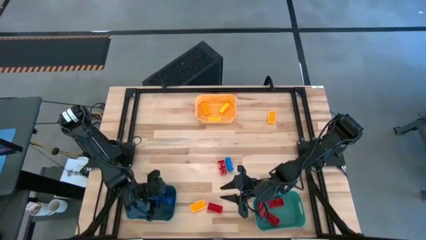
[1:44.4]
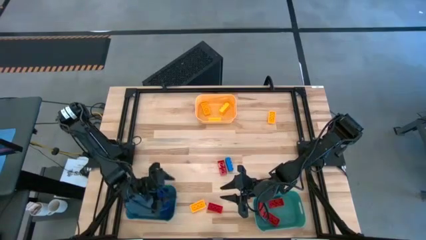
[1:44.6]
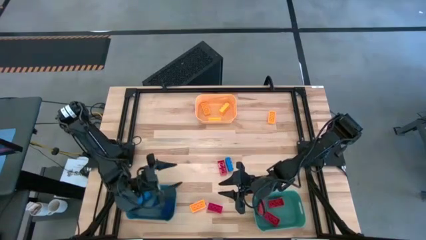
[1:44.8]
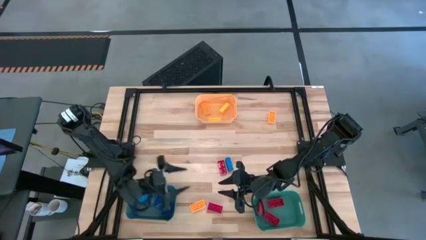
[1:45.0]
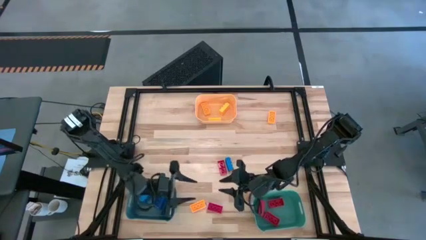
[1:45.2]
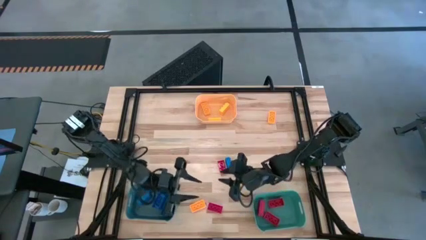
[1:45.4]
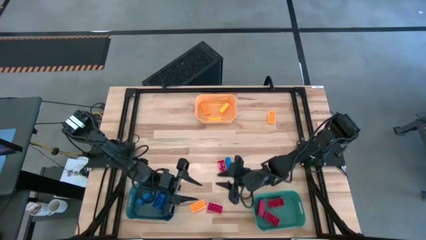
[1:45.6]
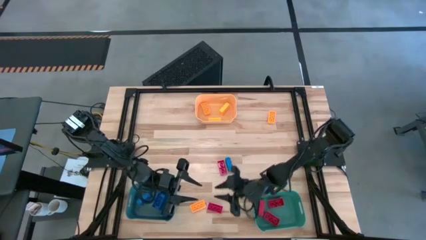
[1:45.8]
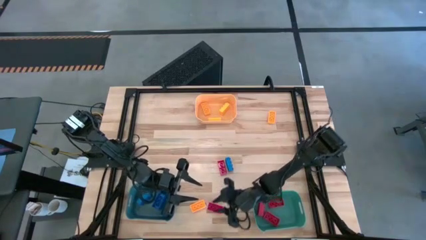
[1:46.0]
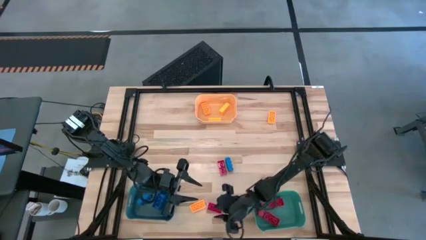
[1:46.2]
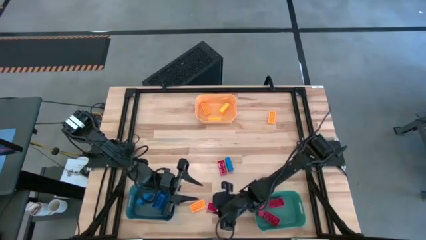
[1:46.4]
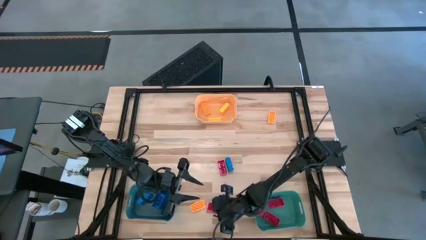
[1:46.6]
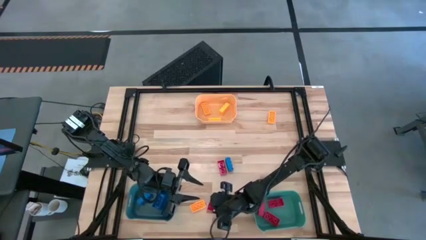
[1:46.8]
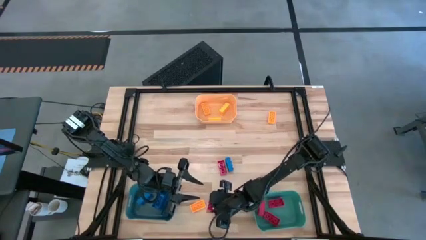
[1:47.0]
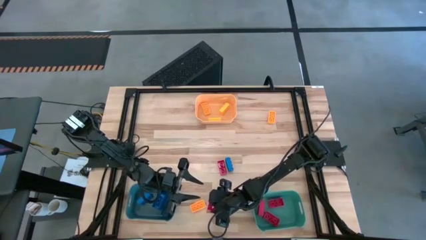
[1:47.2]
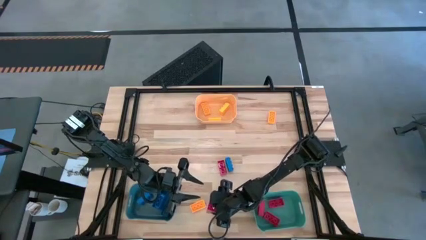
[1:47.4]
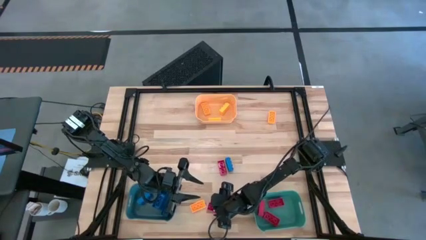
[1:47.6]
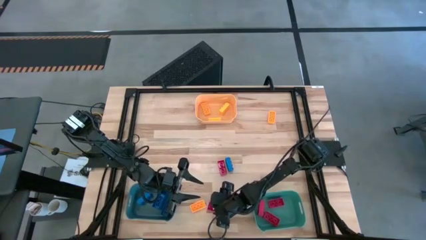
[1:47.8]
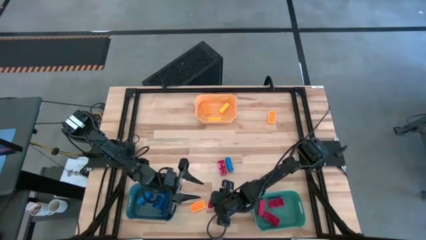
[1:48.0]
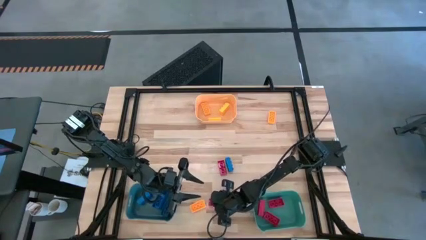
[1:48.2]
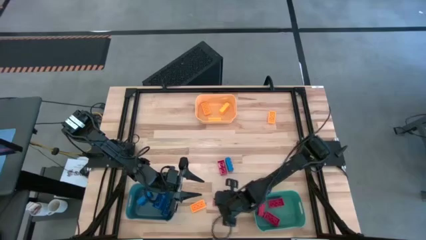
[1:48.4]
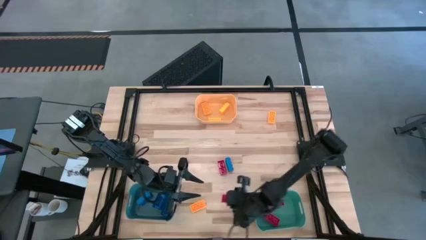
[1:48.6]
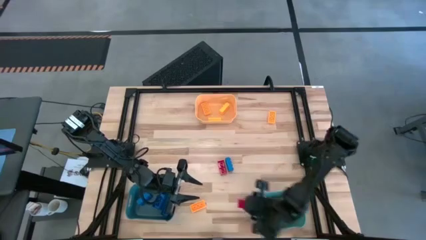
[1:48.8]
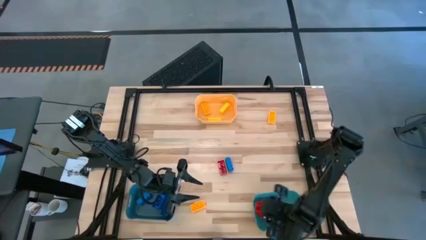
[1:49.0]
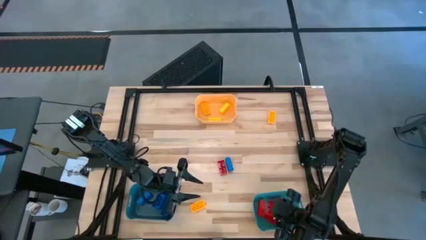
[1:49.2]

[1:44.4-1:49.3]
Task: Sort & place blocks by color
Put the red game piece into the green bin

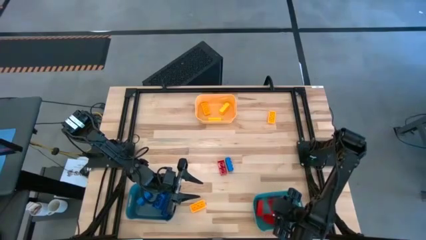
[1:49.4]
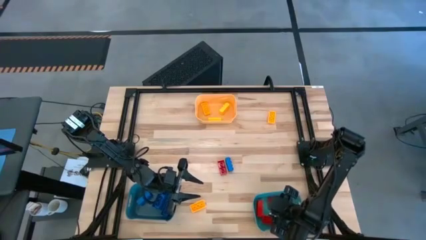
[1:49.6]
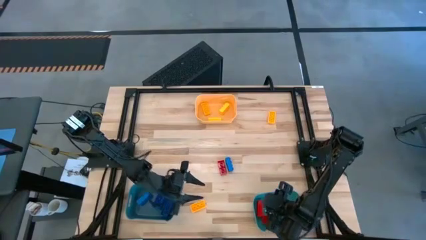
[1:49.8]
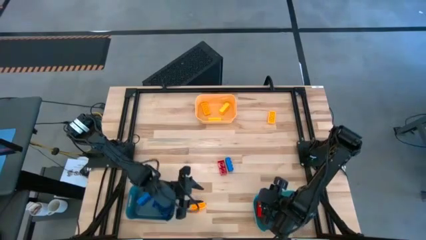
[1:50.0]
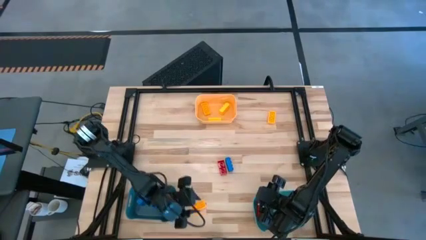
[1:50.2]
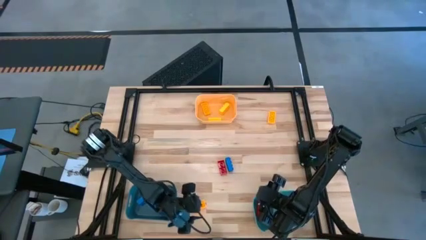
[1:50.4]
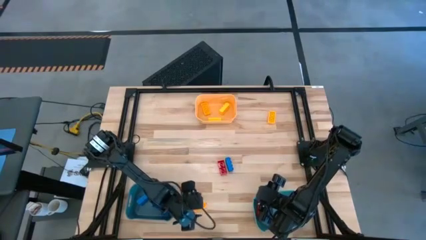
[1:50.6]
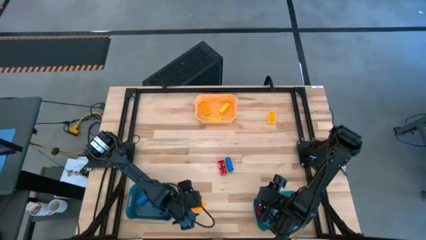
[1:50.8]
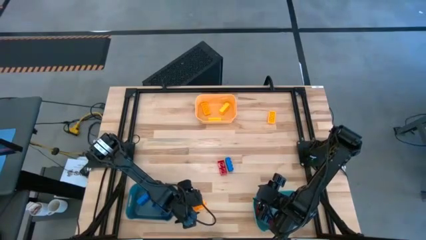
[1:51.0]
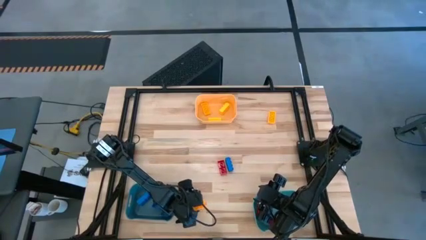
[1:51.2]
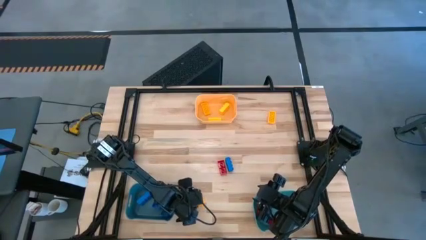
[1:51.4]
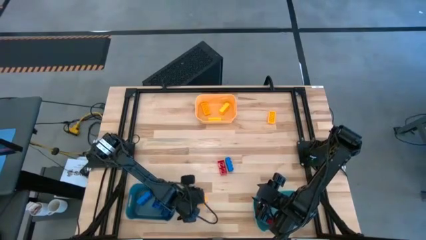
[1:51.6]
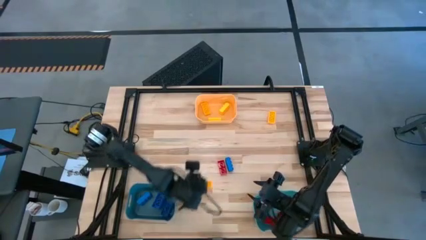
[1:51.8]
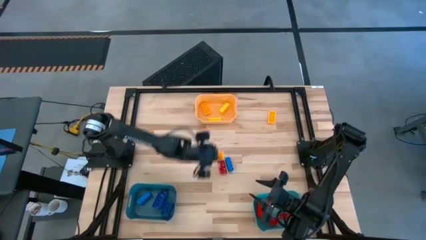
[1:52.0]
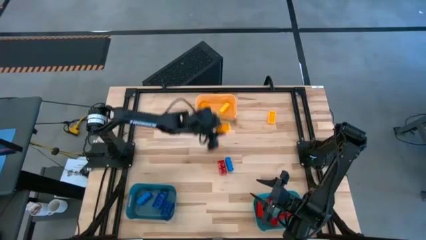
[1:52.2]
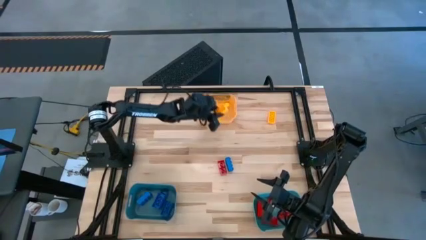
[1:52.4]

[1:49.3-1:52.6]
Put the yellow game piece into the yellow bin

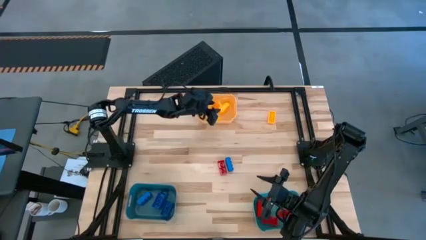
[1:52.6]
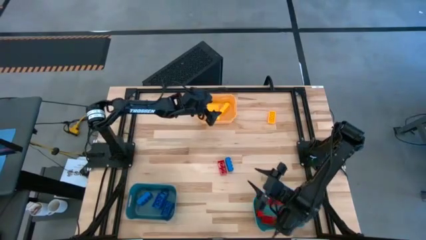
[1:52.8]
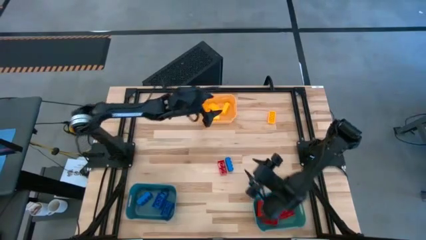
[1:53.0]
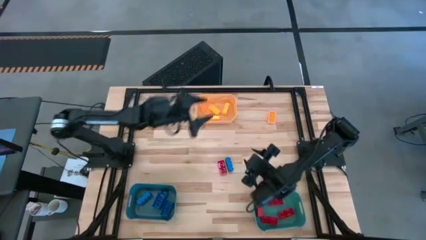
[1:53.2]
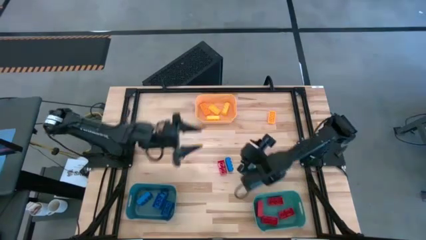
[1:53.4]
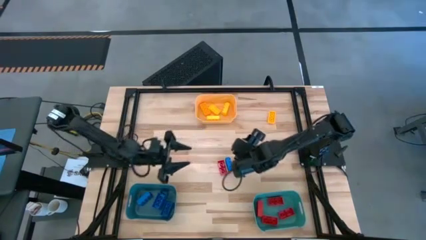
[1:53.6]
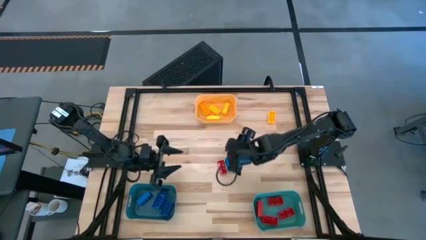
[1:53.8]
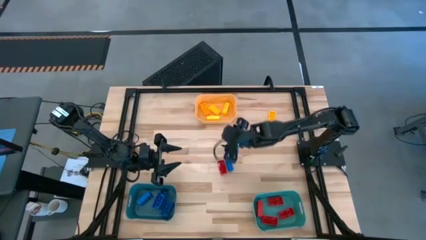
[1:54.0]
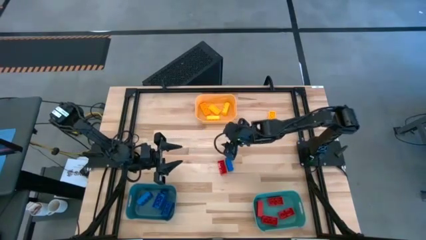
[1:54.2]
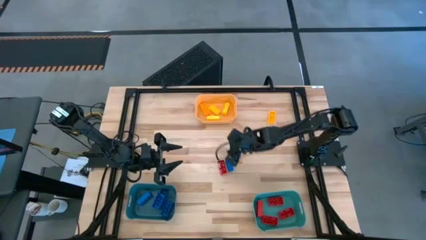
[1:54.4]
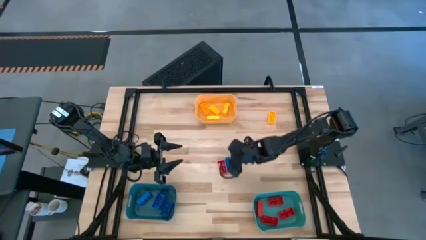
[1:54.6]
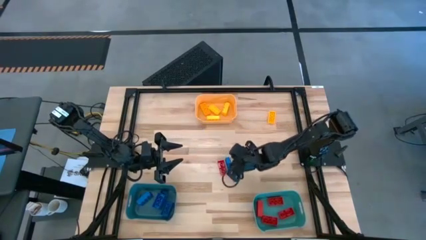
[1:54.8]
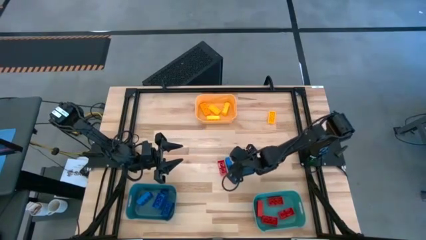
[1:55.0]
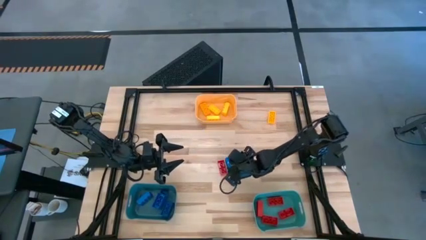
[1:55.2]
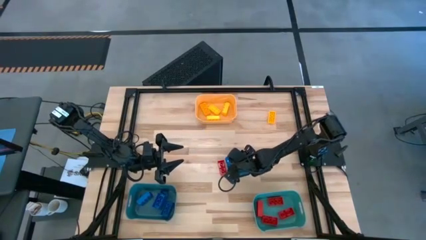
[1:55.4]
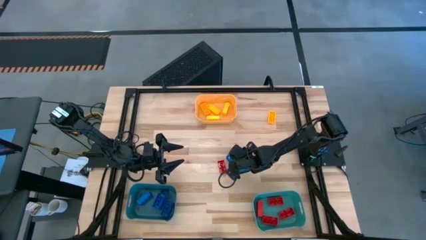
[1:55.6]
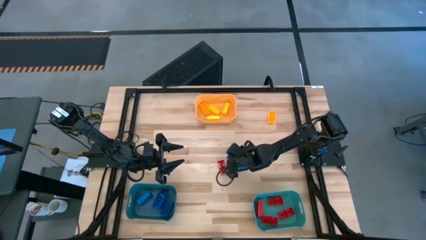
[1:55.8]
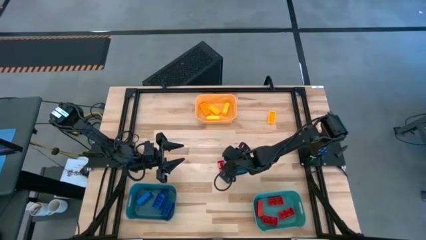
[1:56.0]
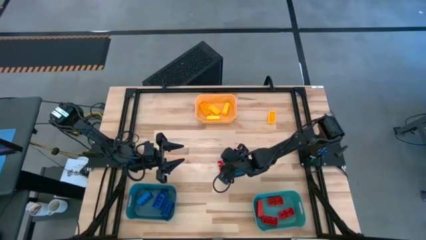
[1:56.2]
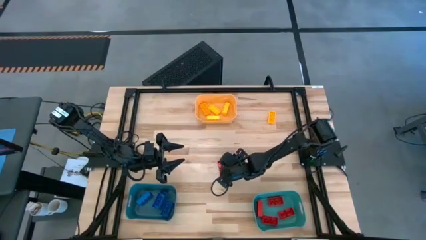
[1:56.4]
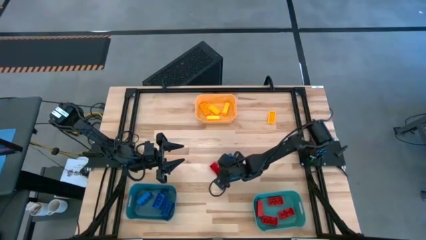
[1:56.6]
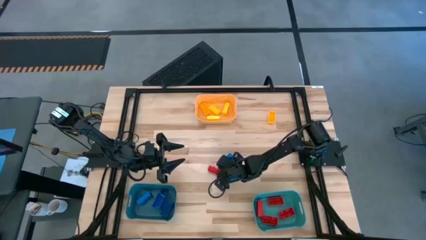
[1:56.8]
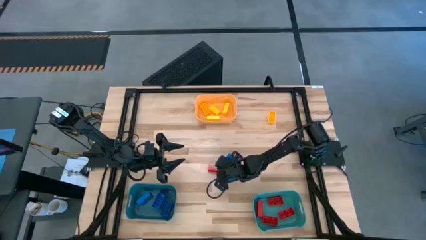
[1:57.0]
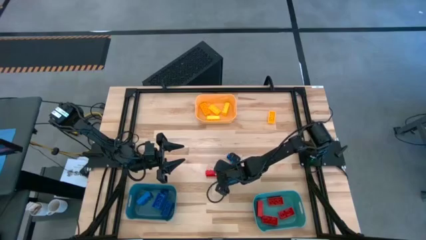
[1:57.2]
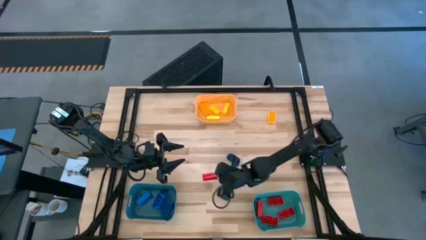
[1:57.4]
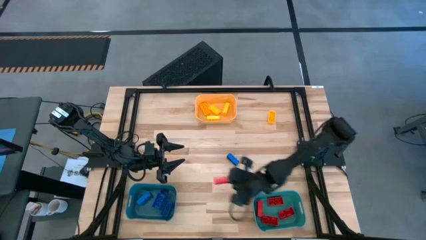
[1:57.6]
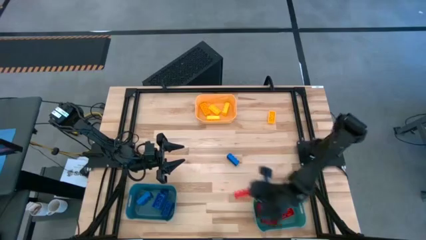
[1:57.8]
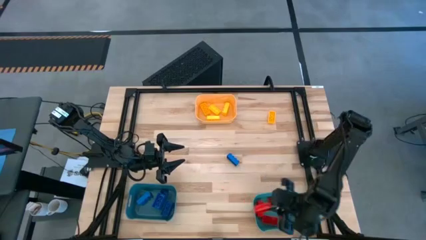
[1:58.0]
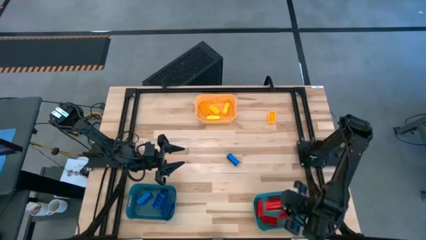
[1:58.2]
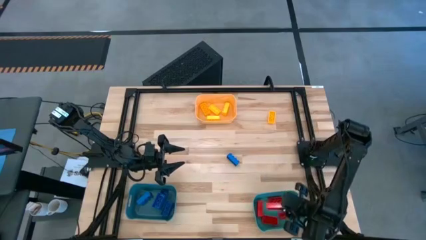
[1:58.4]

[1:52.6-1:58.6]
Put the red game piece into the green bin

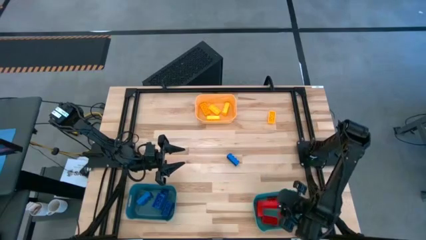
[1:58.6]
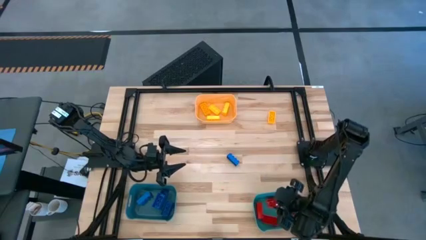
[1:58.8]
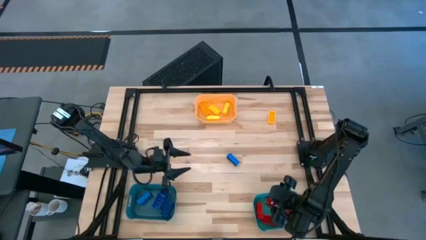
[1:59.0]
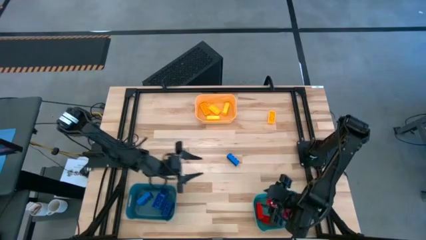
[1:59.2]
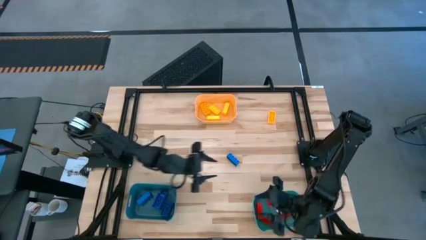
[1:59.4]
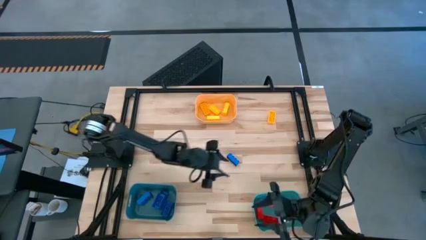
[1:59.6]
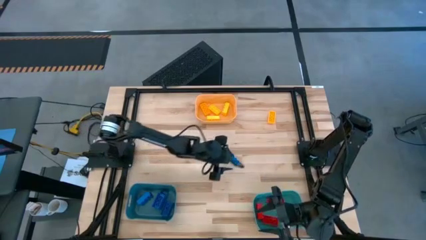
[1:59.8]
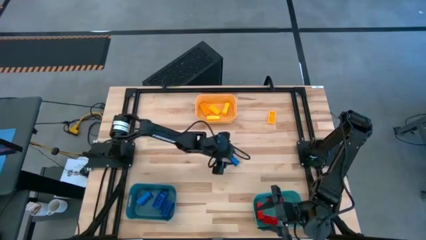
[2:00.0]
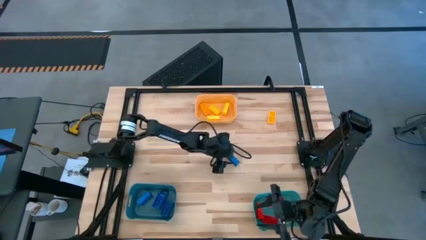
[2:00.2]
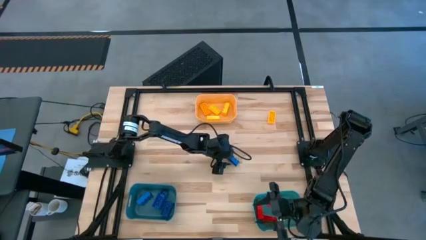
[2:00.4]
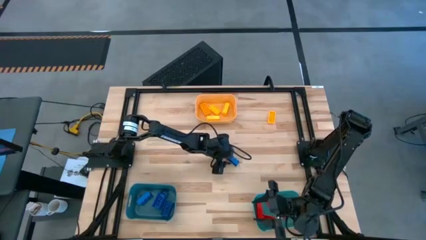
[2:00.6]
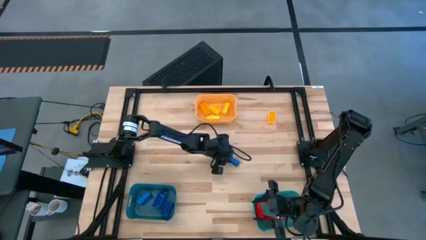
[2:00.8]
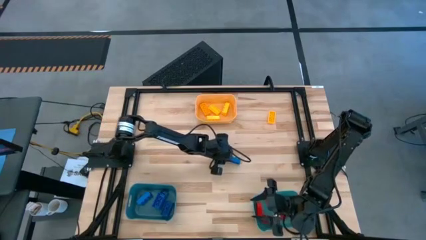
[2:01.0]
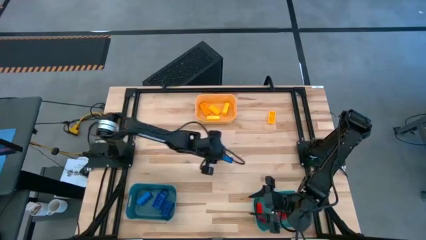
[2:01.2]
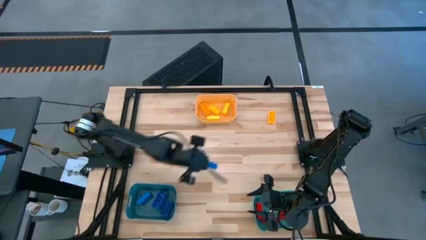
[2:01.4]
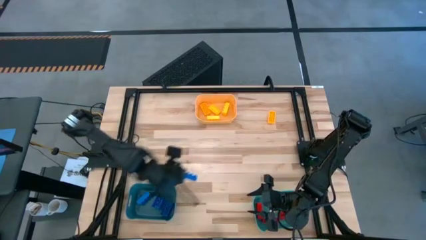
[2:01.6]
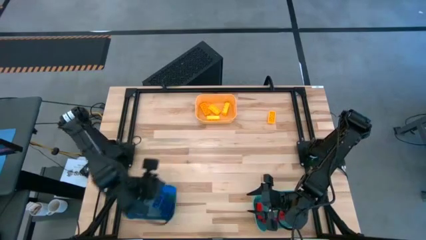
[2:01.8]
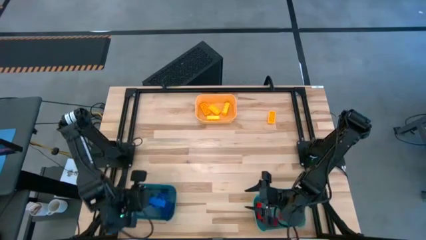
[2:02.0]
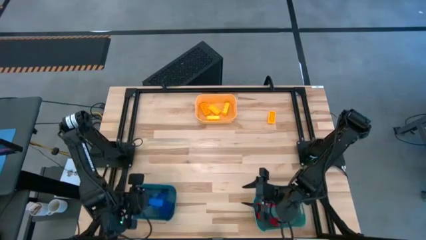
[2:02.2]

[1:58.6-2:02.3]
Put the blue game piece into the blue bin
